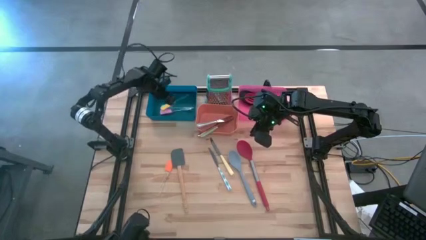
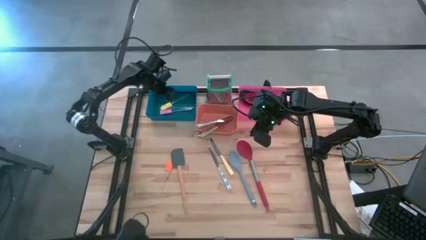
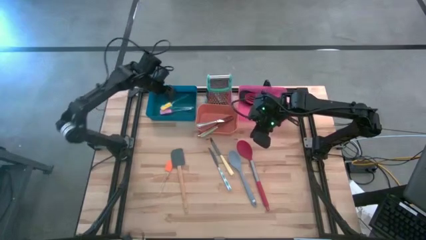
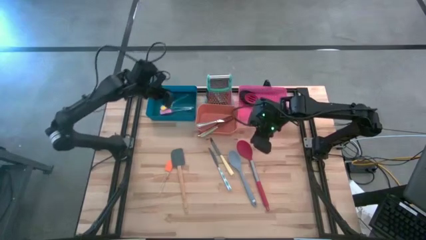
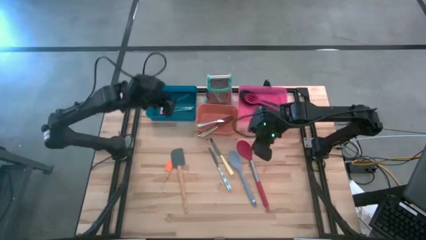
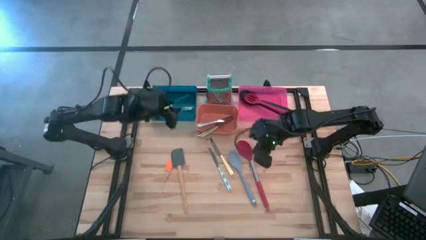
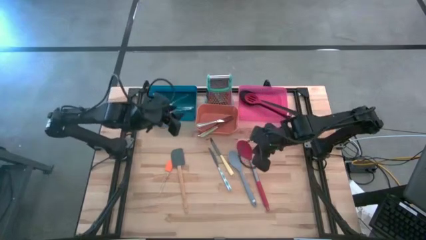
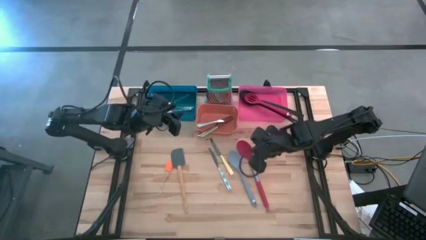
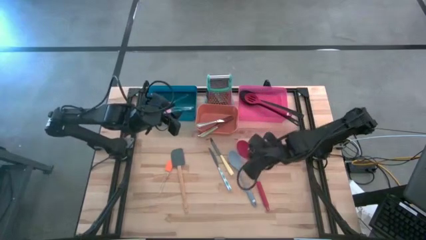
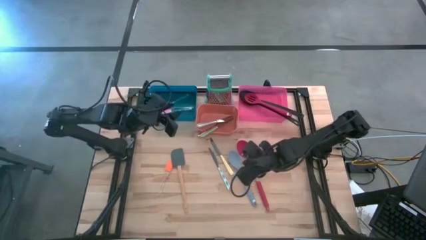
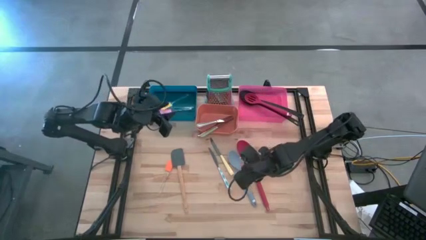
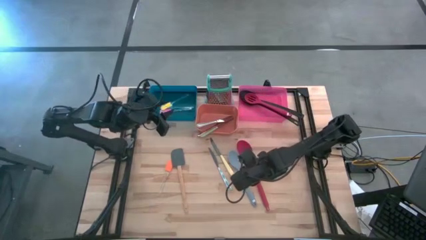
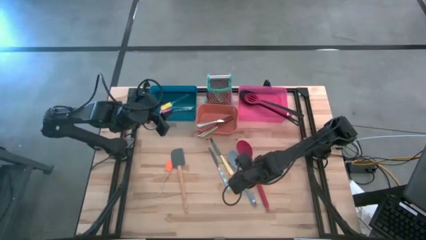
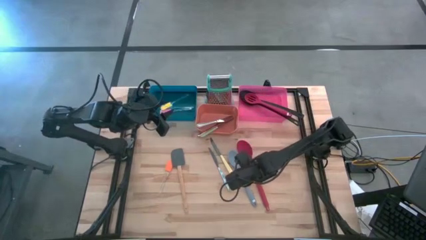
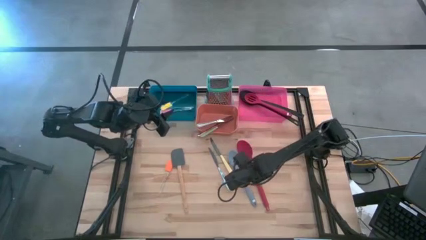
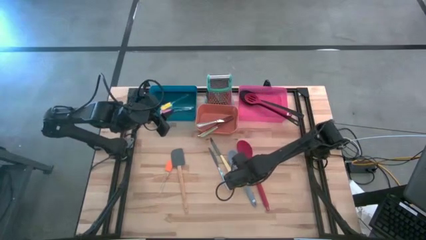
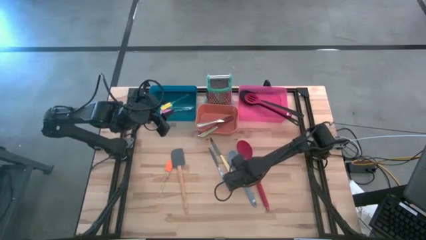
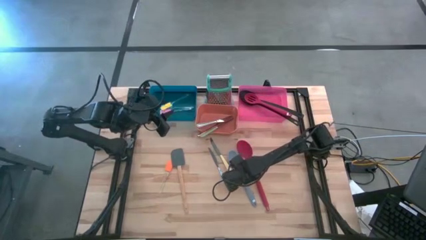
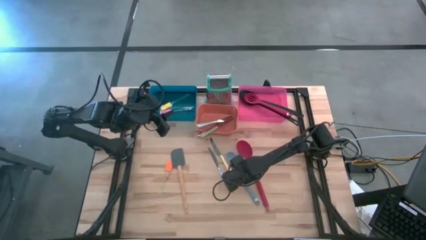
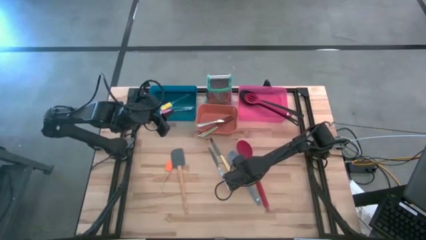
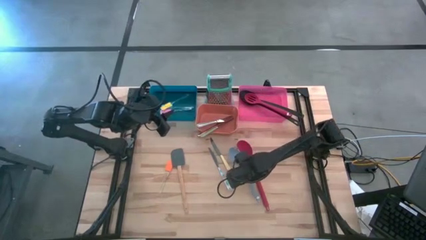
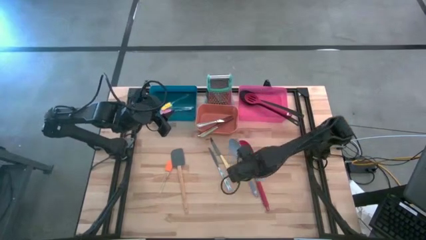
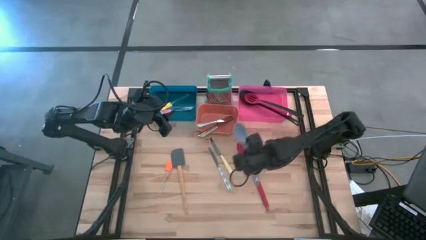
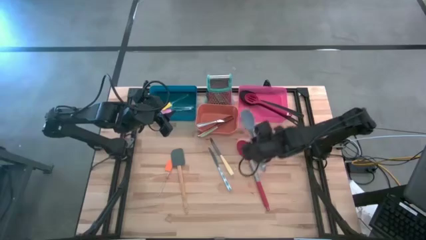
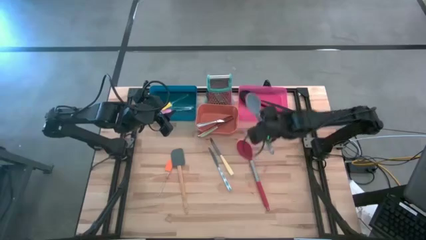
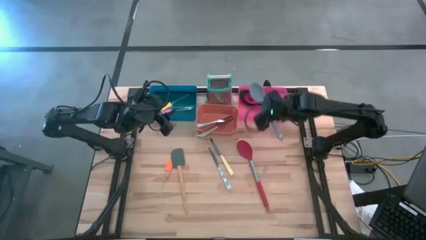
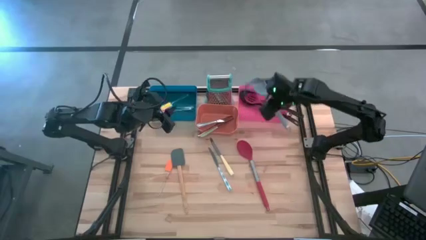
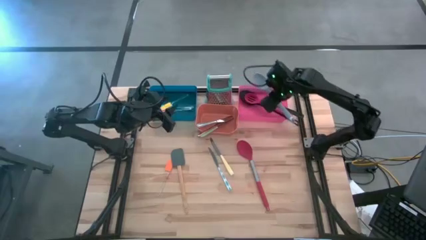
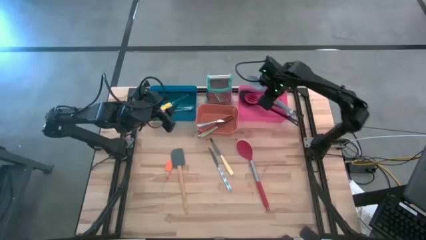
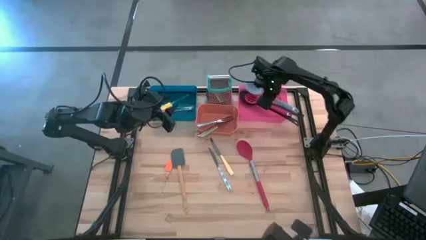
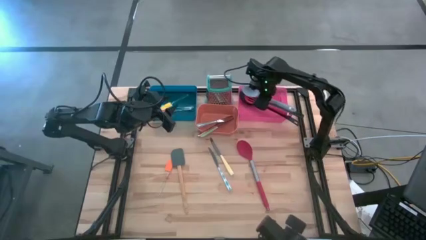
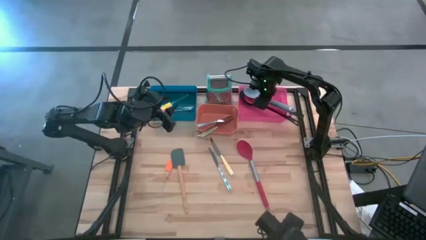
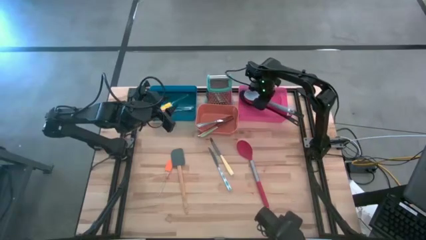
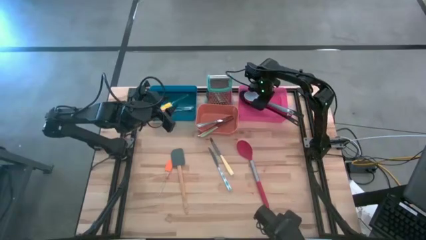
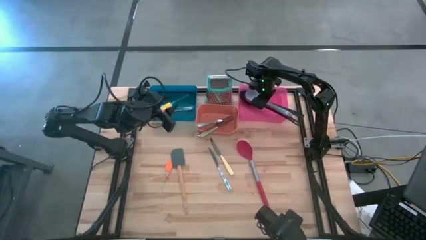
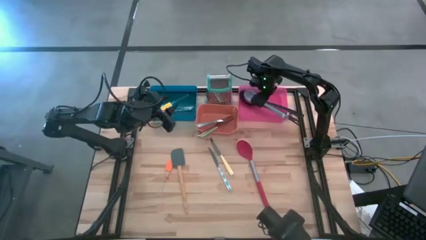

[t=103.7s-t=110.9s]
Task: Pick & Place Kitchen Items
Put the light blue ladle scoop into the pink bin

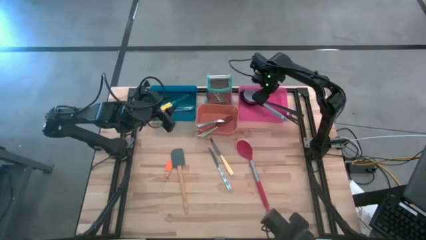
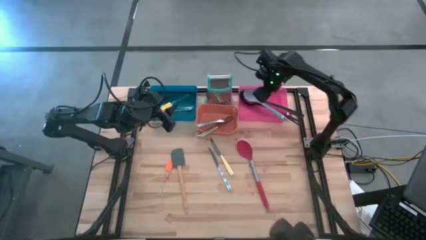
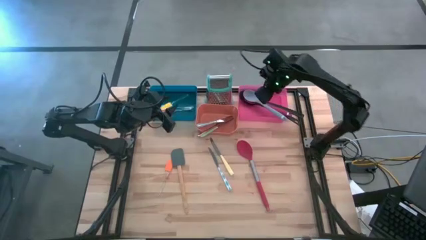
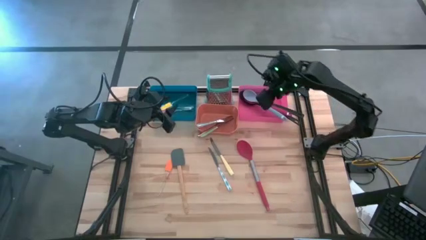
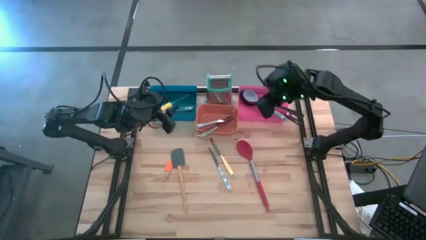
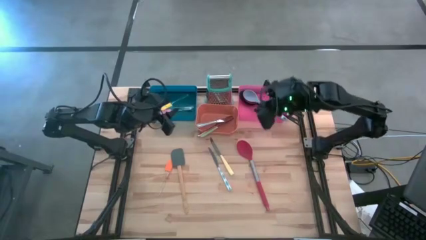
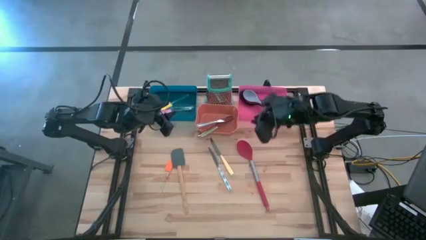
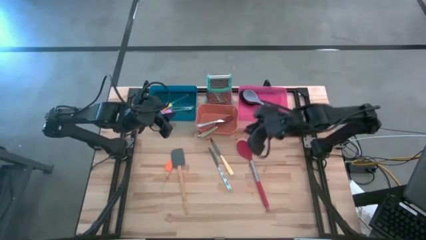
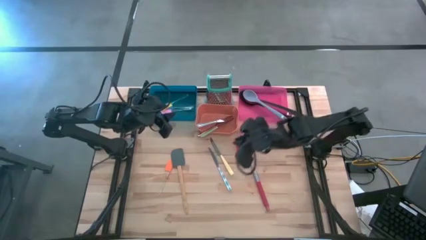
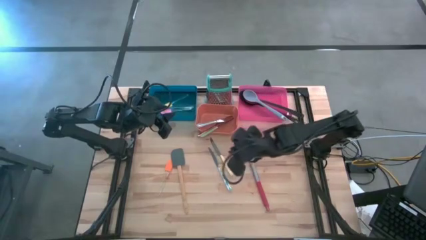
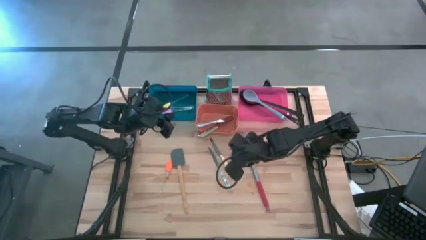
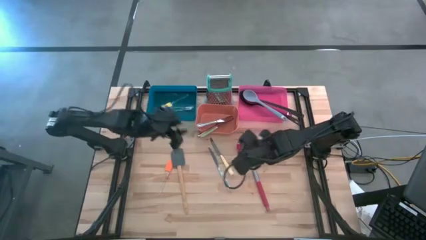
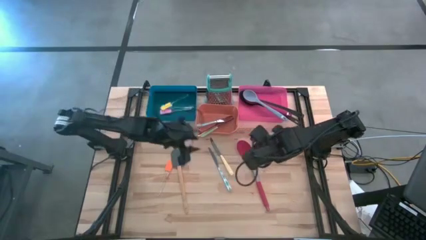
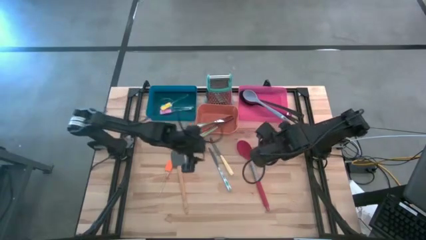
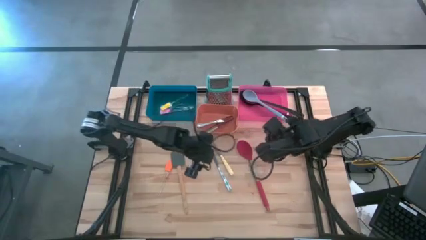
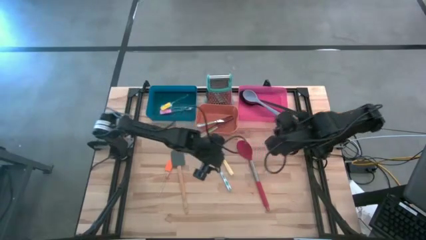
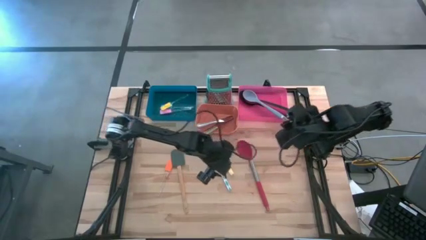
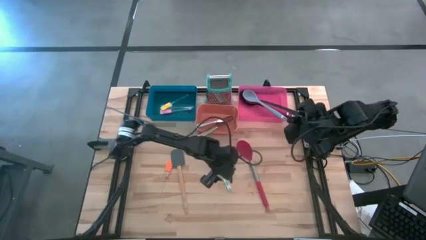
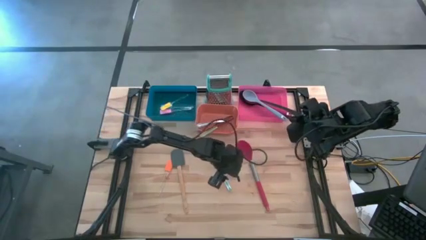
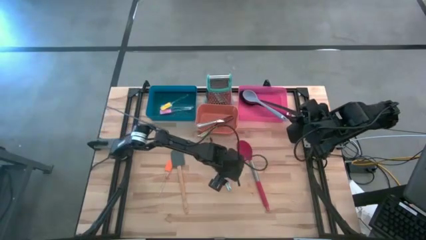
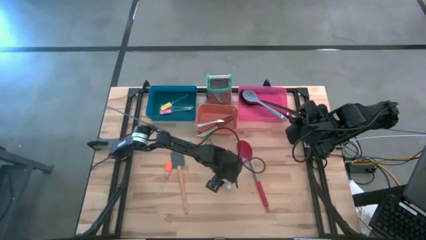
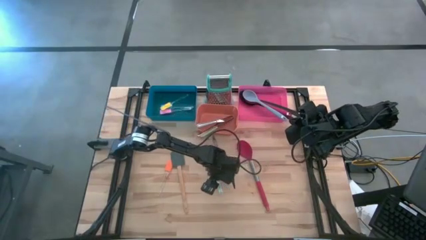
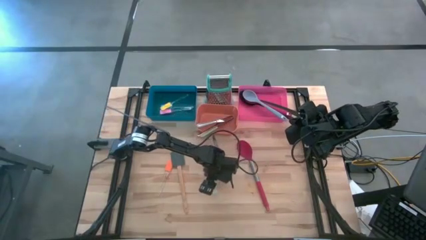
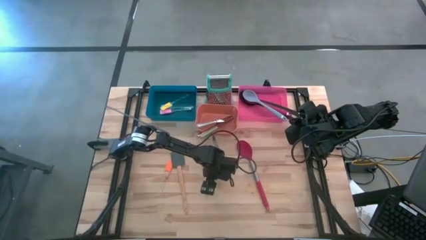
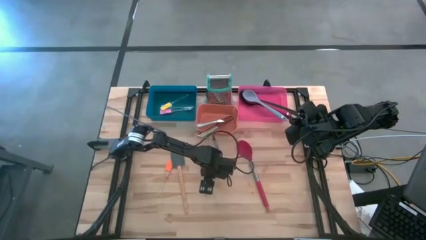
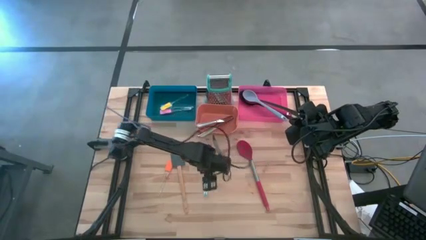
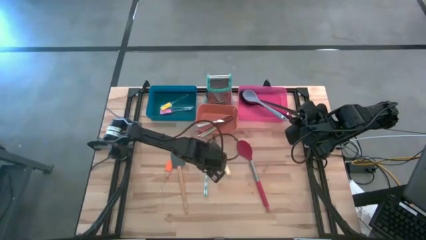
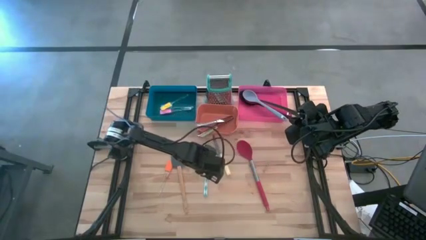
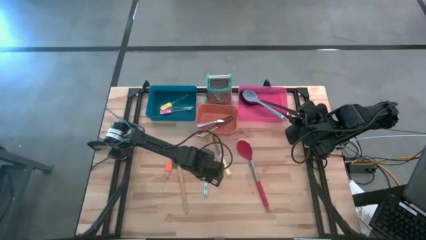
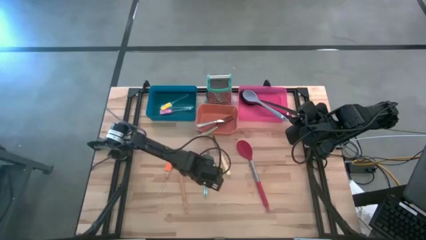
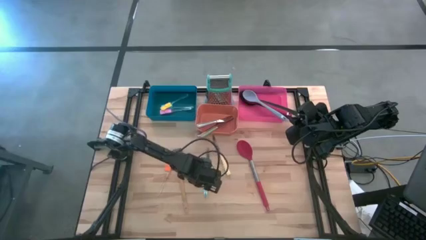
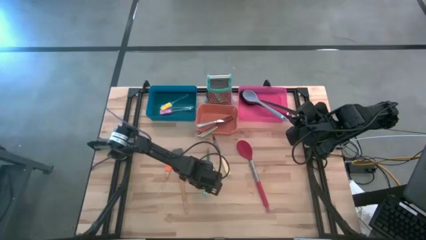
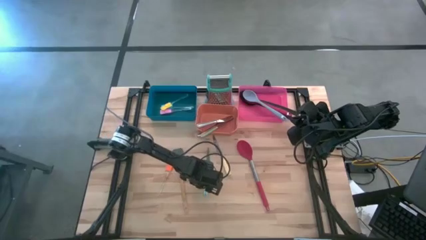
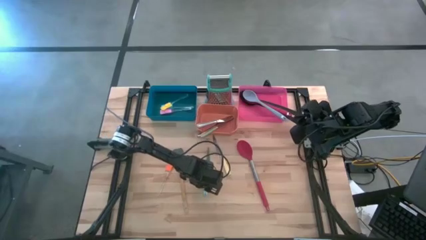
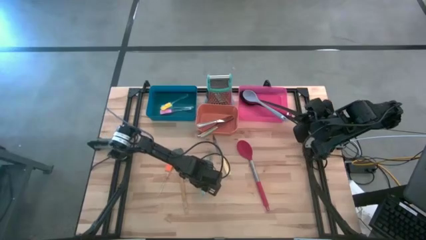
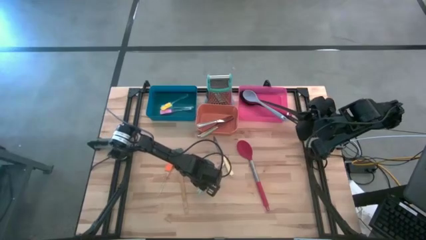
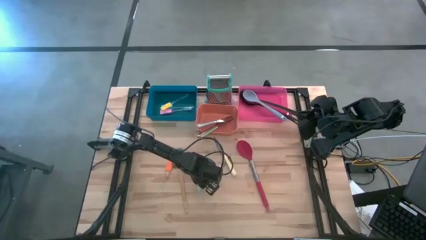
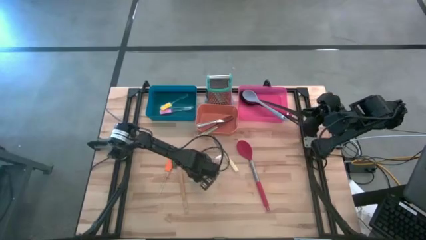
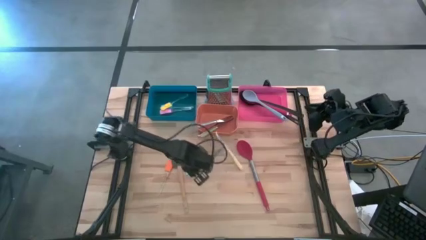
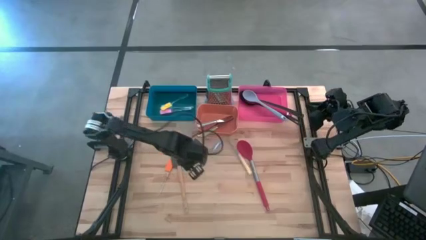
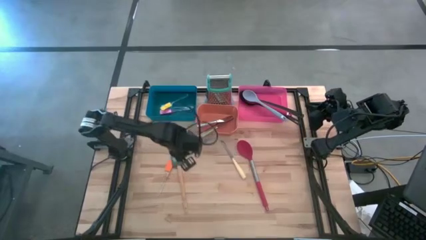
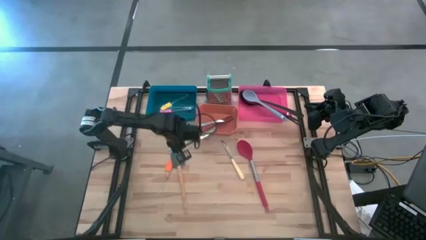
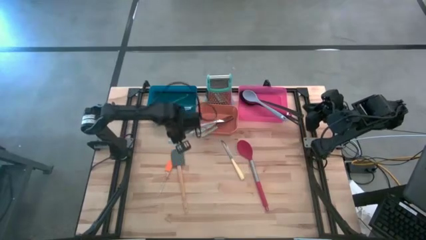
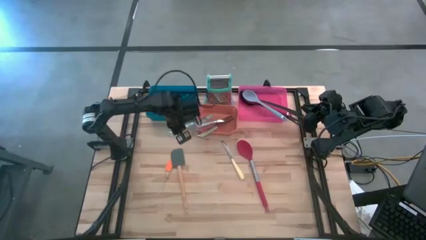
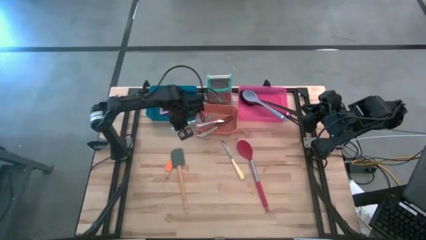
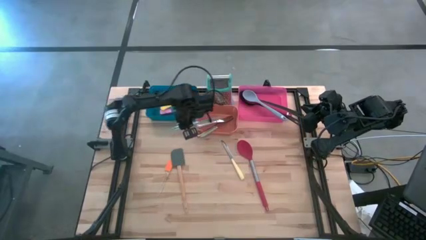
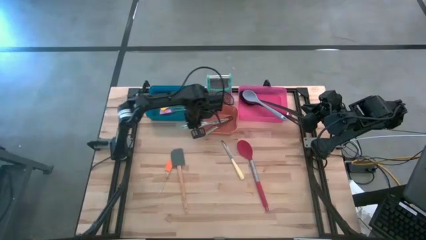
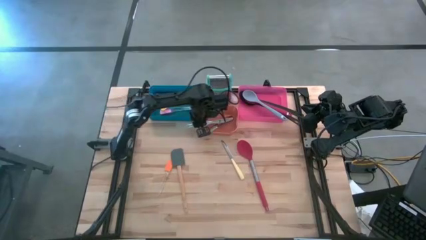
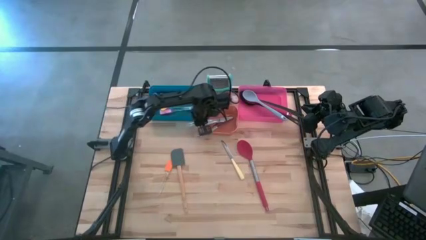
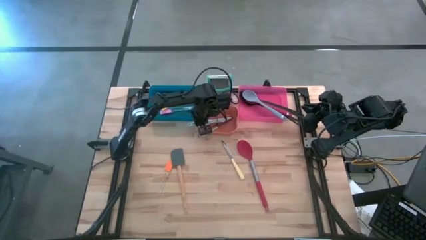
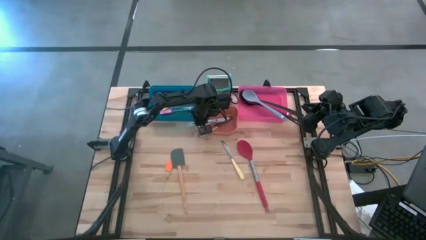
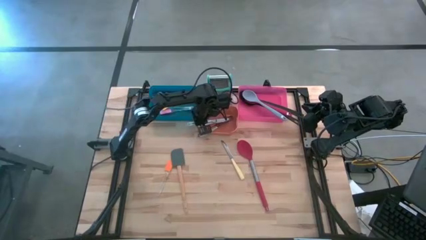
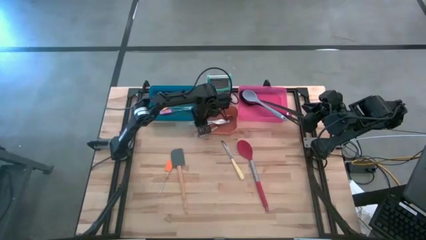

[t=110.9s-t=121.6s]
Put the white blue patterned table knife into the brown bin
